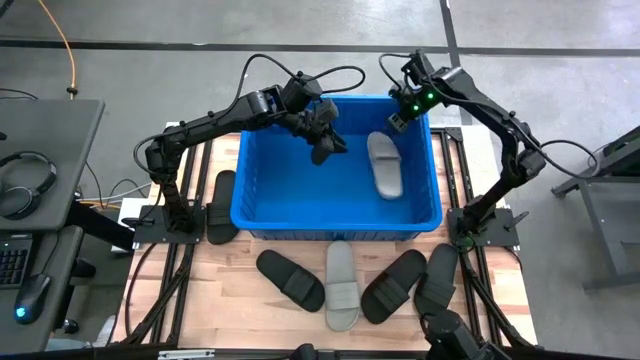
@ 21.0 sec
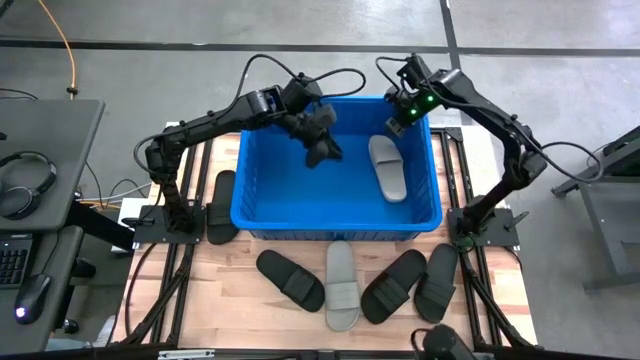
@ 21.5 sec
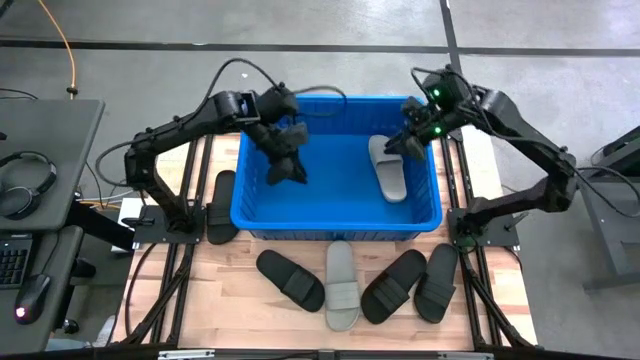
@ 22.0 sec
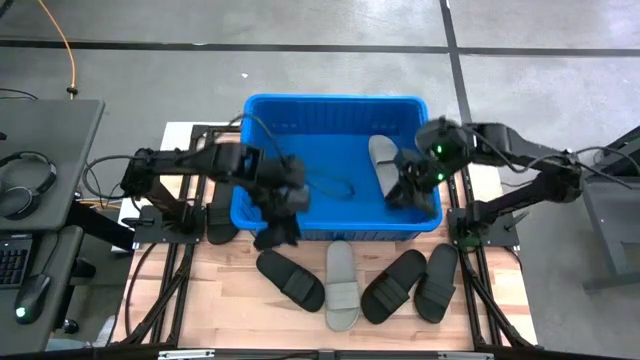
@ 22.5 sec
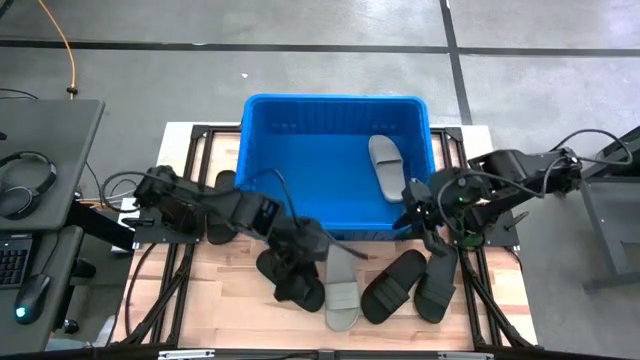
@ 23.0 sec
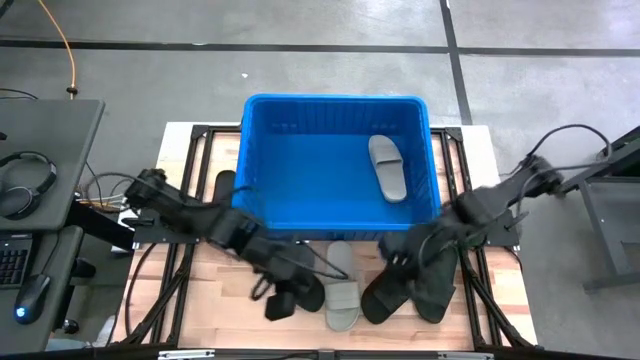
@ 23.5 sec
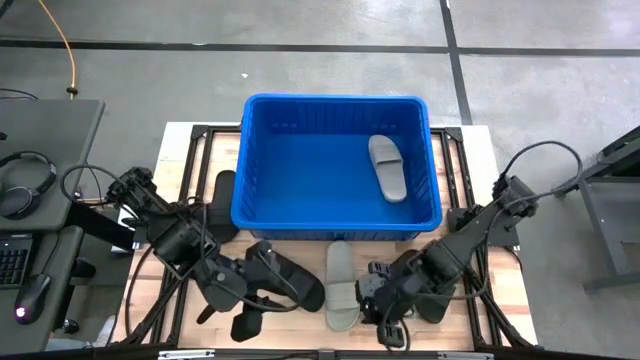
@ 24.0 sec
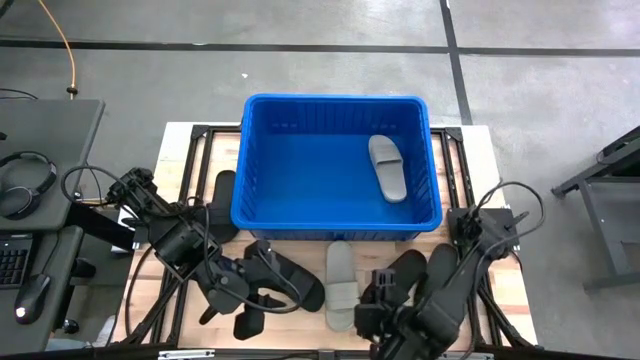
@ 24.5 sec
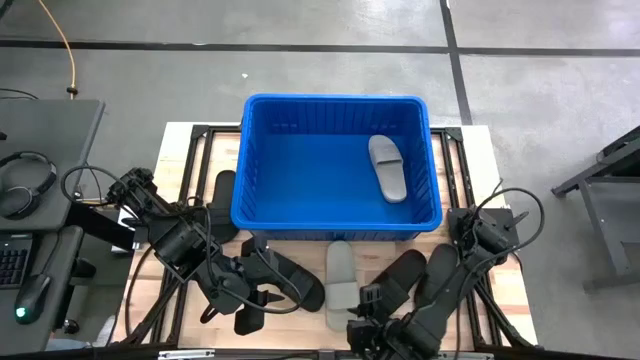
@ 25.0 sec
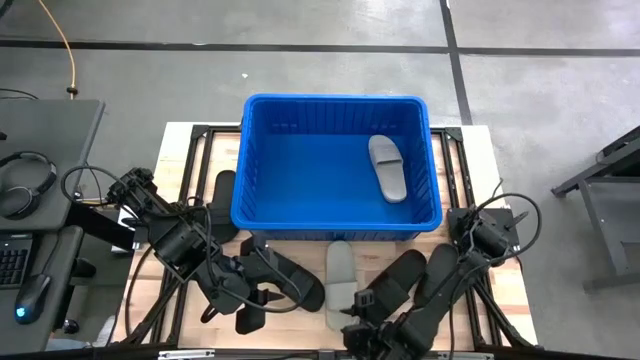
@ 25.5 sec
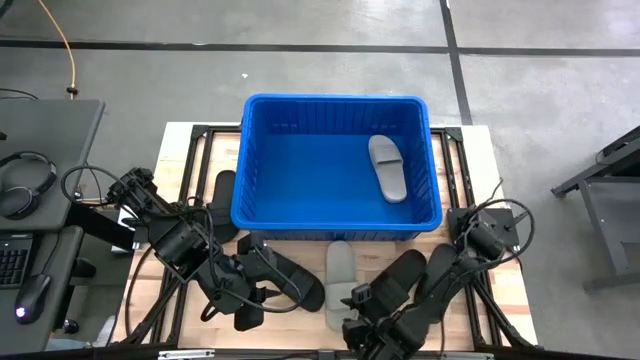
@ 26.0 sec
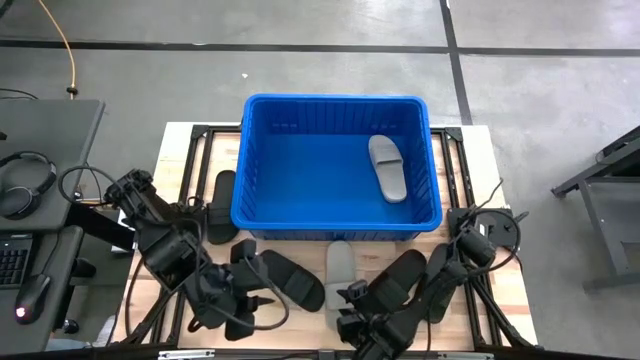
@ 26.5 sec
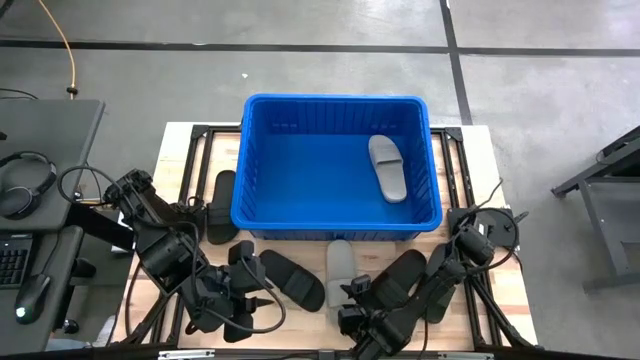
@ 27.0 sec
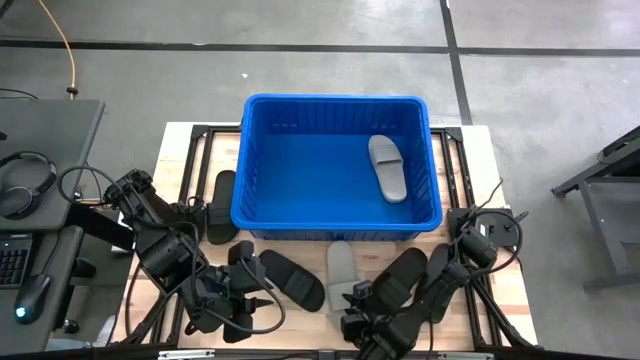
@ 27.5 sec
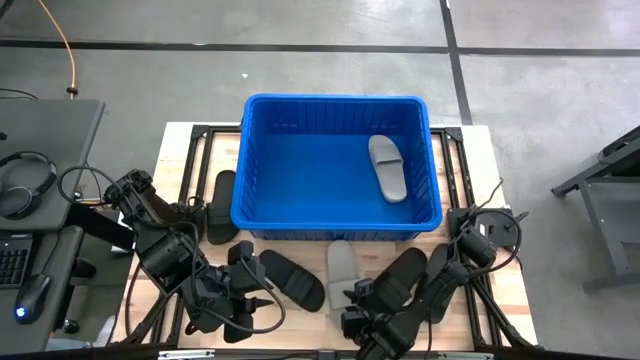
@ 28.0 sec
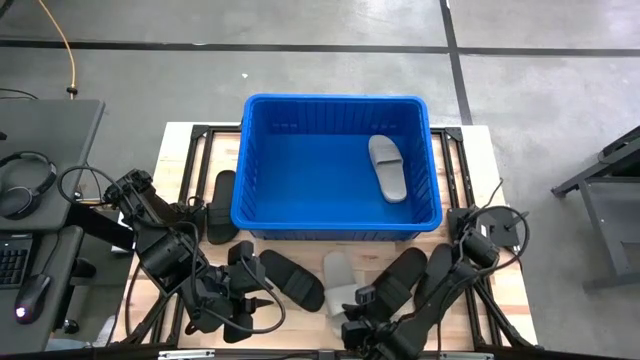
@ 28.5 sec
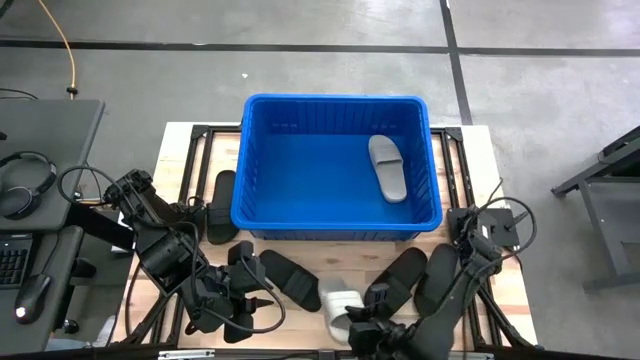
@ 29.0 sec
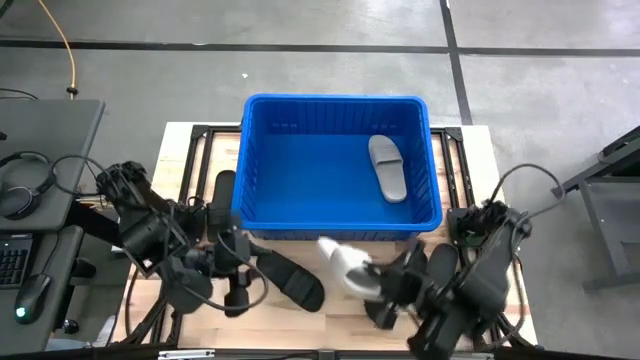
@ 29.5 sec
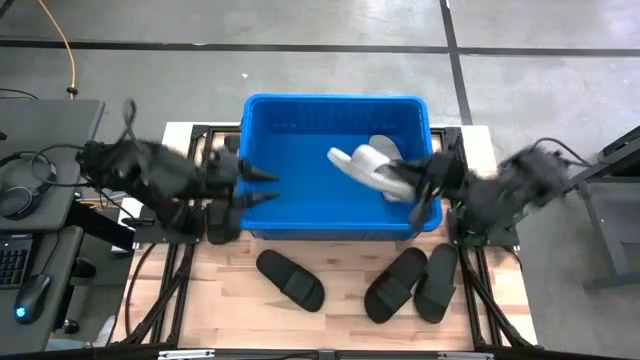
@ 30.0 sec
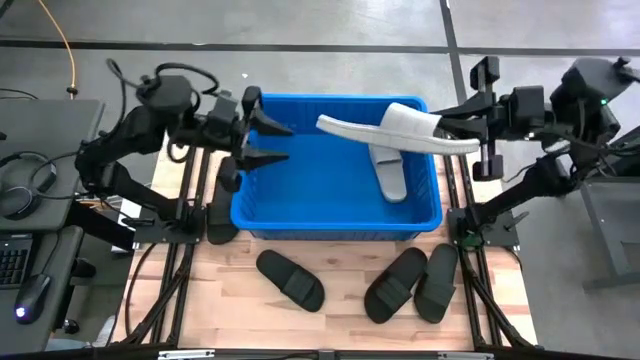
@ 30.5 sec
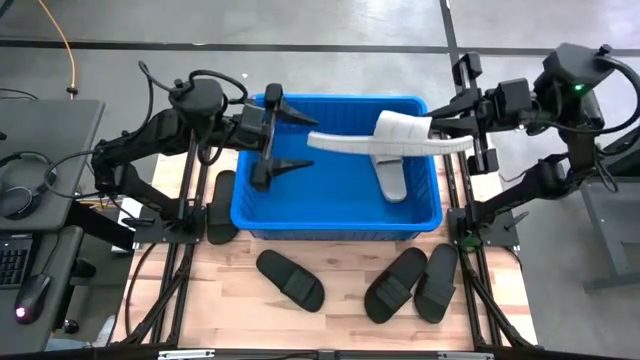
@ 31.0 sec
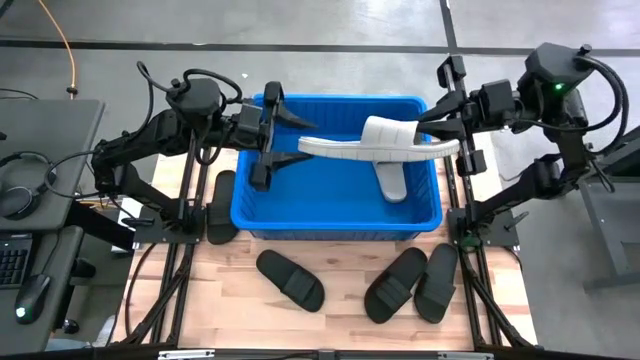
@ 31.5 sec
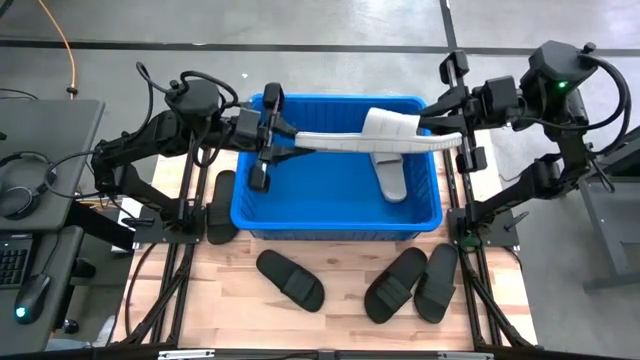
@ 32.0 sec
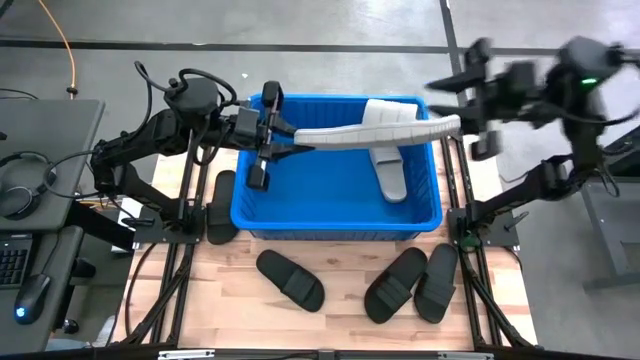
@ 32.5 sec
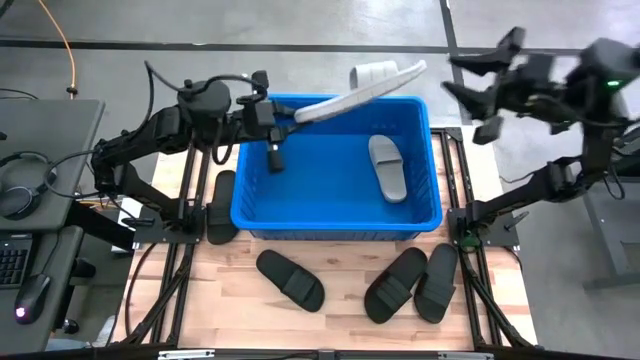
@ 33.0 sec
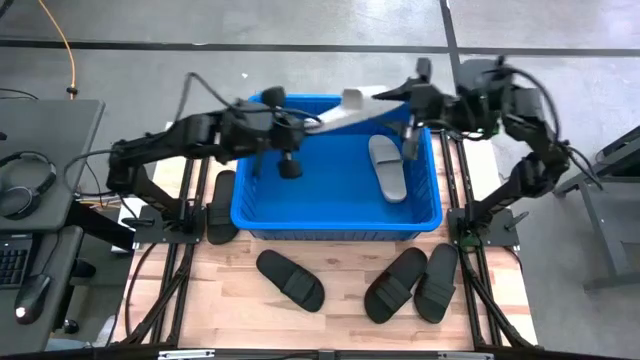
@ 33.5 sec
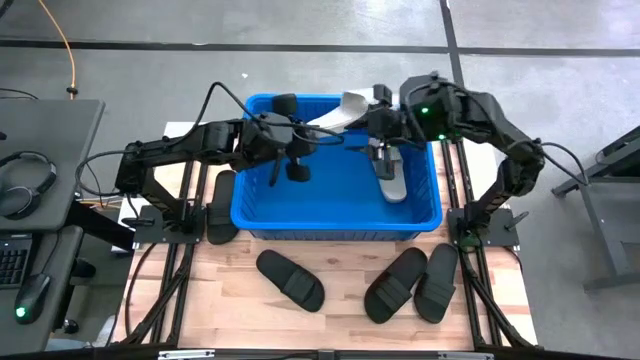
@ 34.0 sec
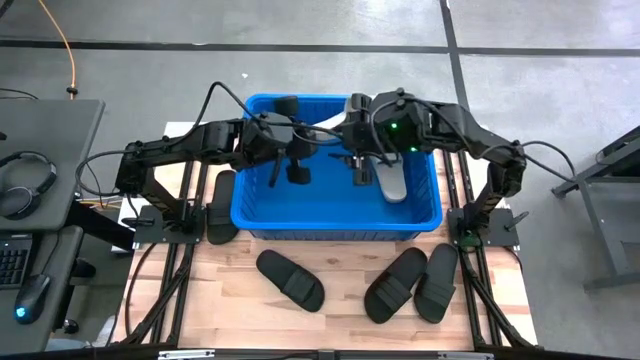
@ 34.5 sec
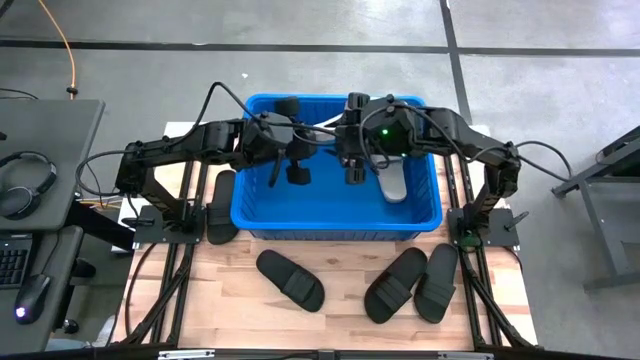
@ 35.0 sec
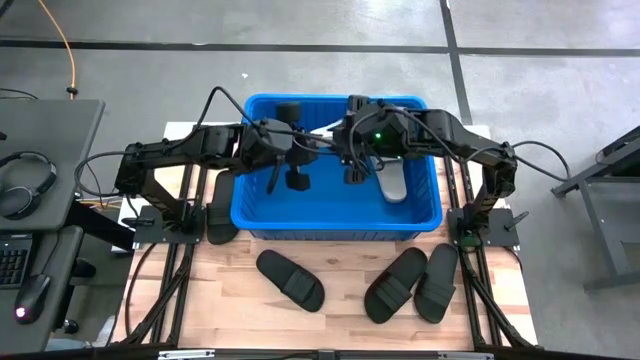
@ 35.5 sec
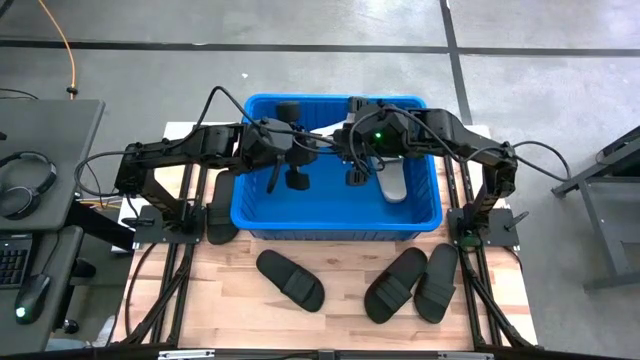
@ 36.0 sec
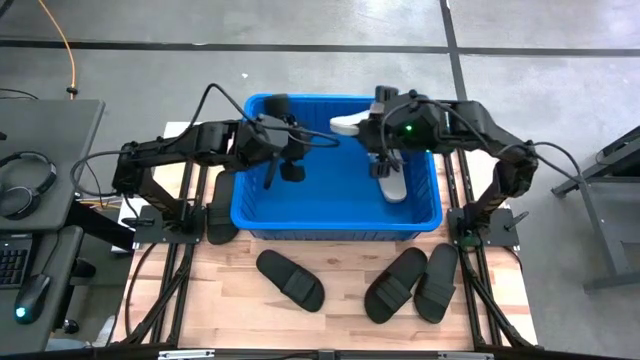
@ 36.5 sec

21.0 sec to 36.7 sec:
Task: Pick and place slides into bin
Put the gray slide into the blue bin
